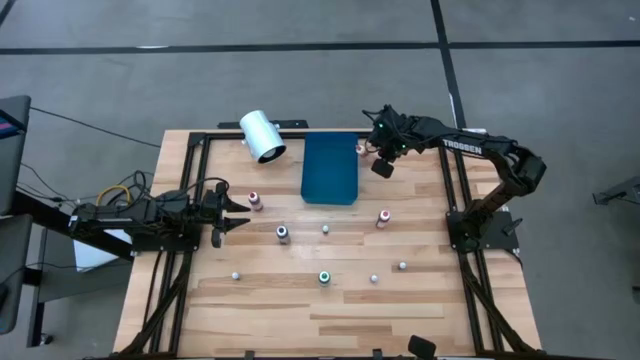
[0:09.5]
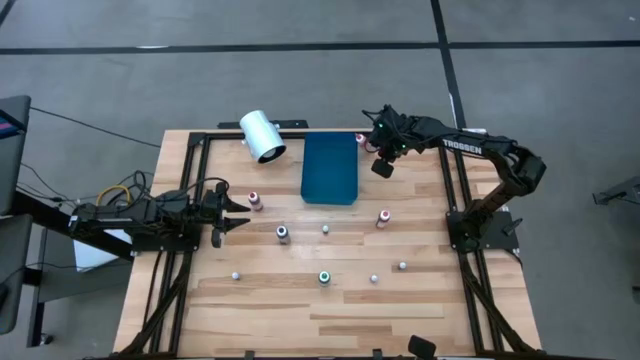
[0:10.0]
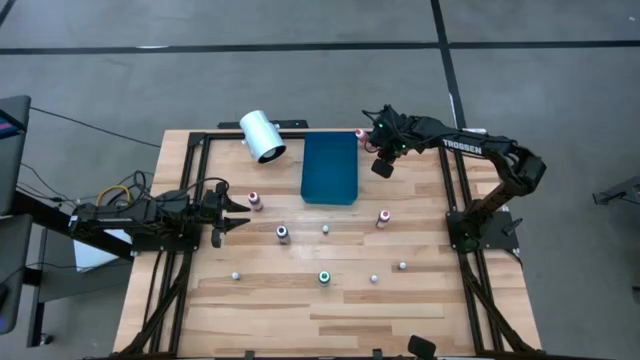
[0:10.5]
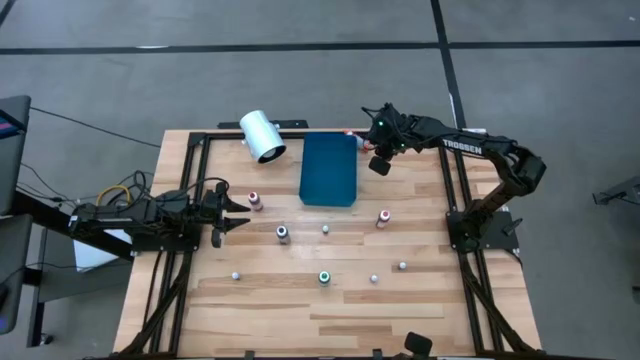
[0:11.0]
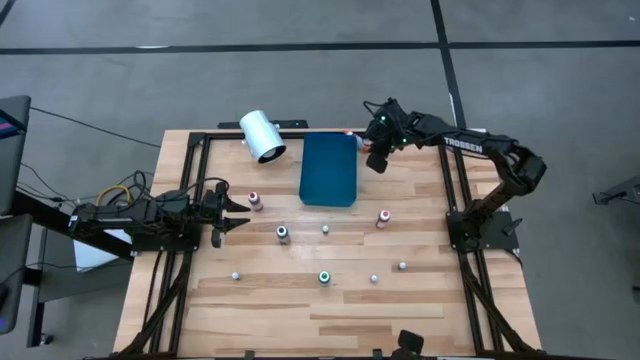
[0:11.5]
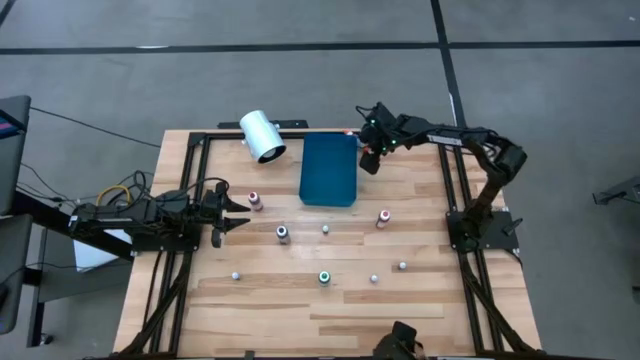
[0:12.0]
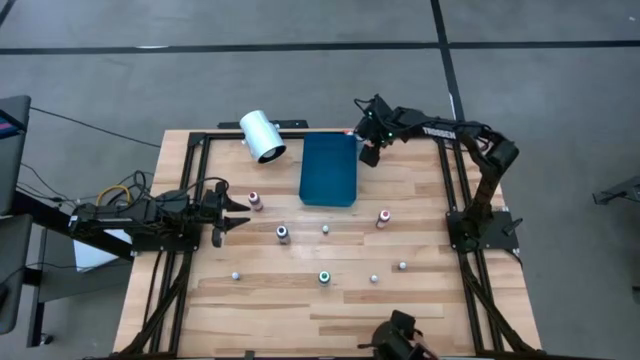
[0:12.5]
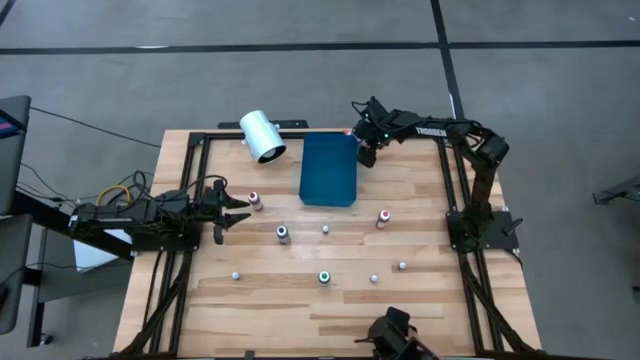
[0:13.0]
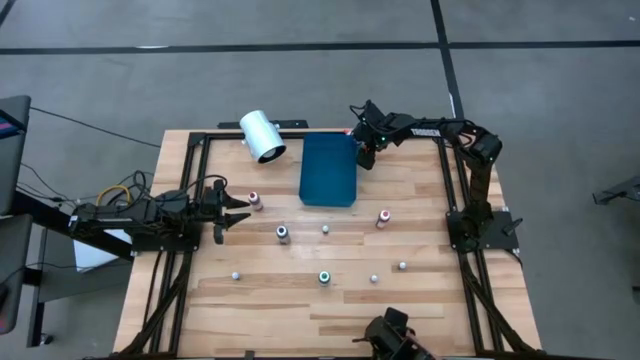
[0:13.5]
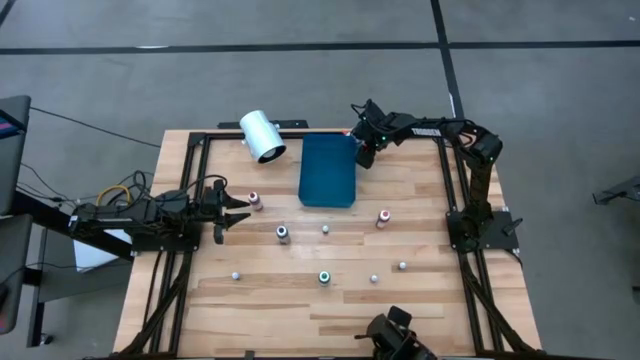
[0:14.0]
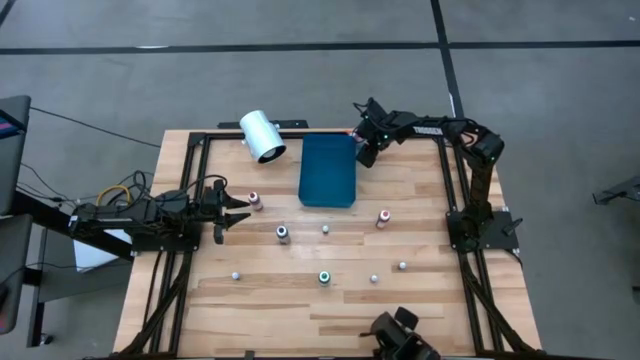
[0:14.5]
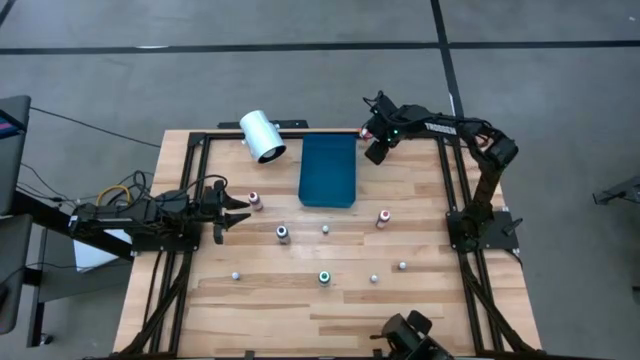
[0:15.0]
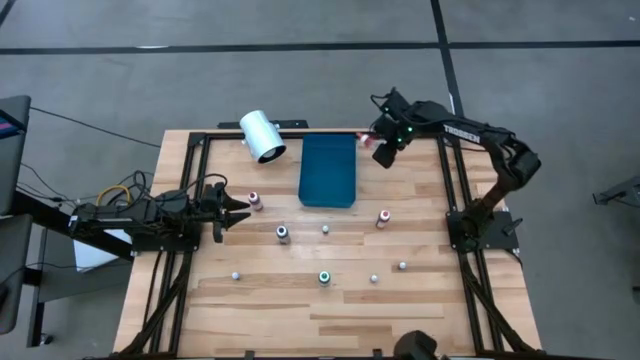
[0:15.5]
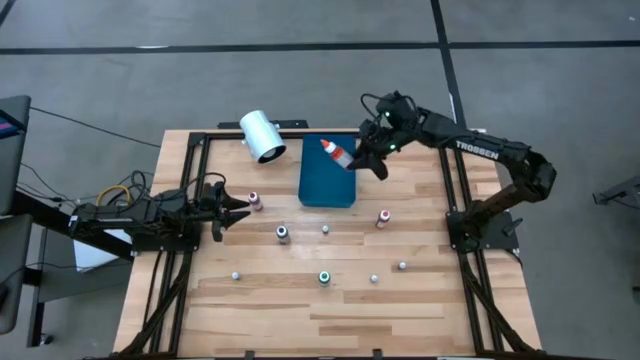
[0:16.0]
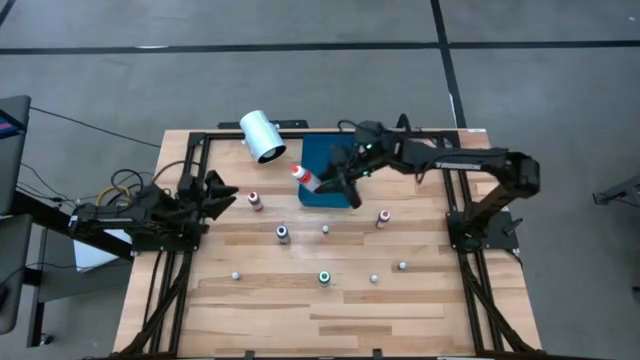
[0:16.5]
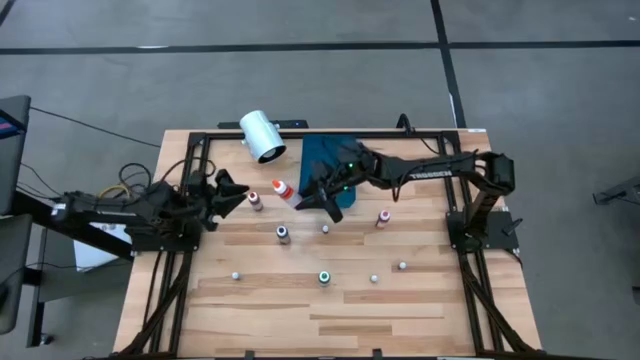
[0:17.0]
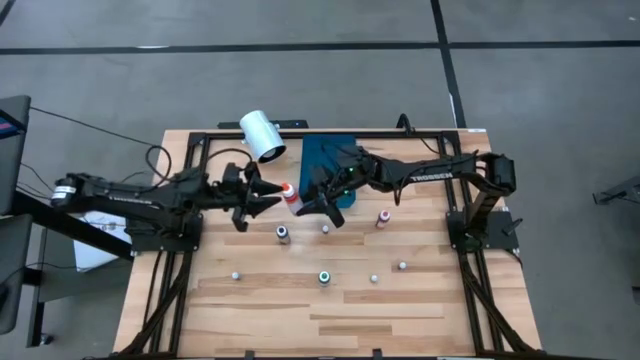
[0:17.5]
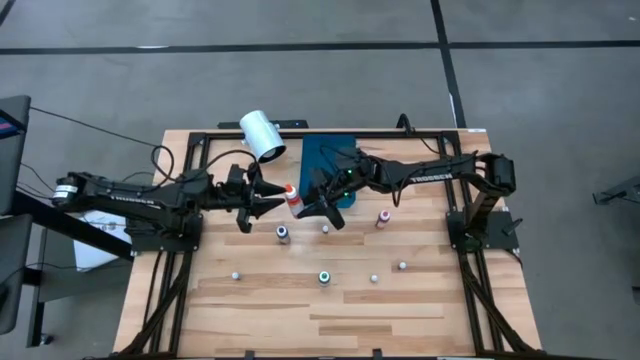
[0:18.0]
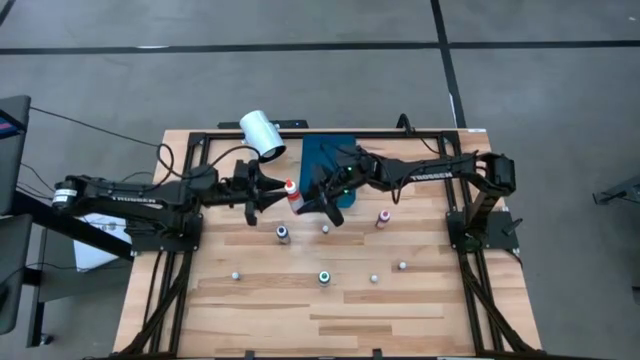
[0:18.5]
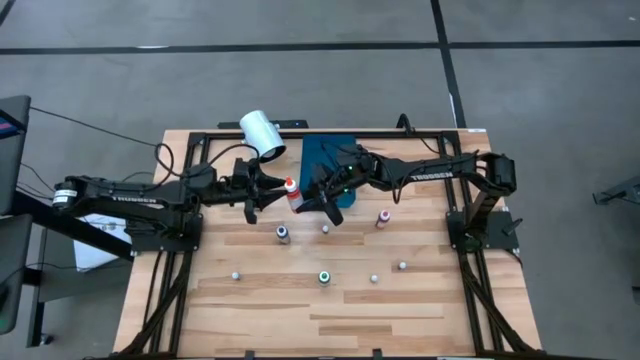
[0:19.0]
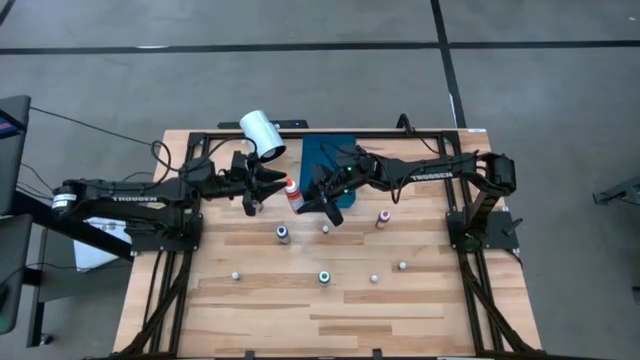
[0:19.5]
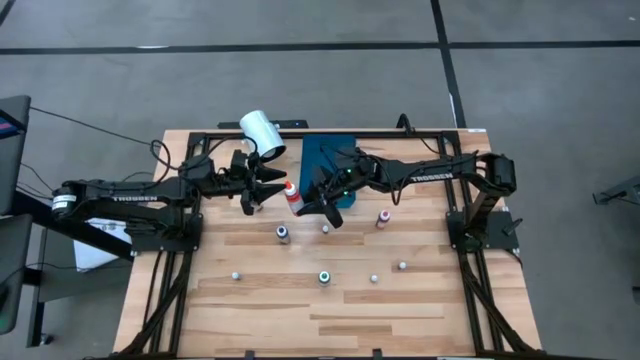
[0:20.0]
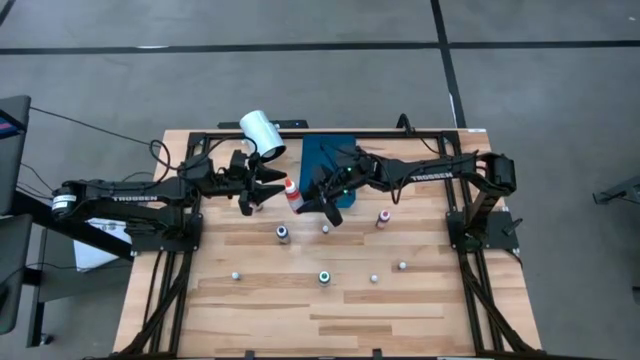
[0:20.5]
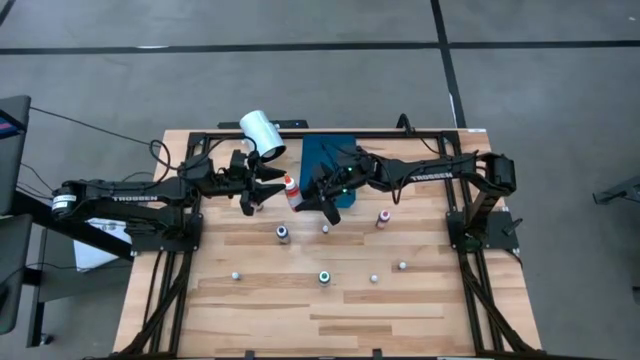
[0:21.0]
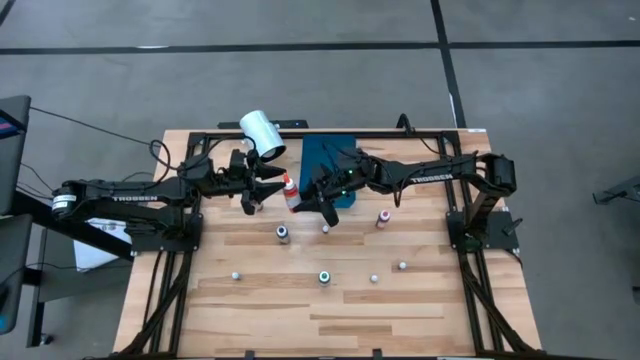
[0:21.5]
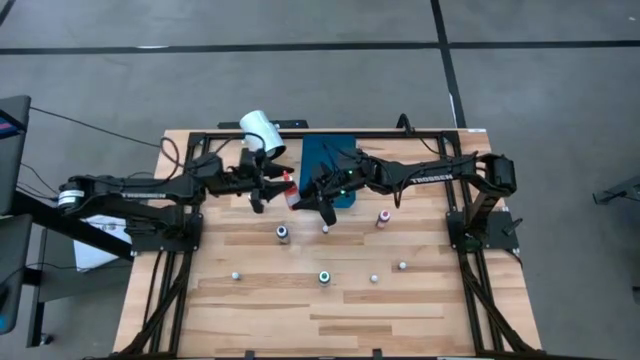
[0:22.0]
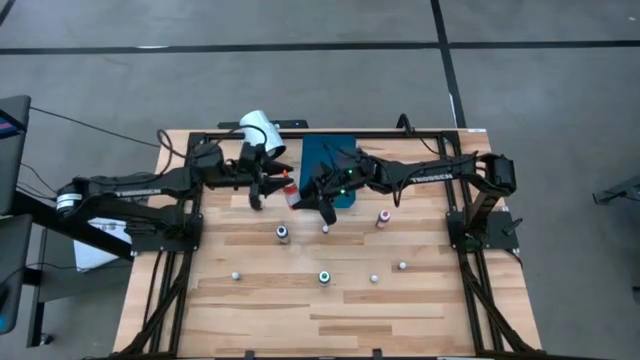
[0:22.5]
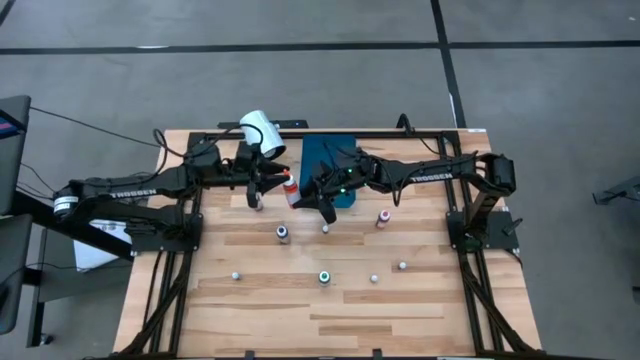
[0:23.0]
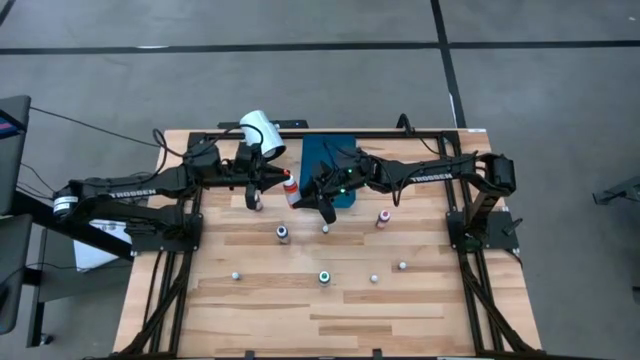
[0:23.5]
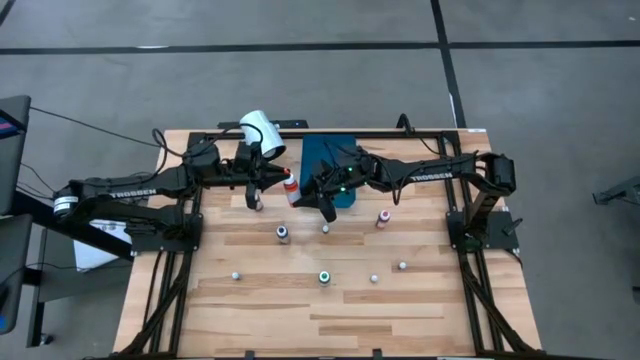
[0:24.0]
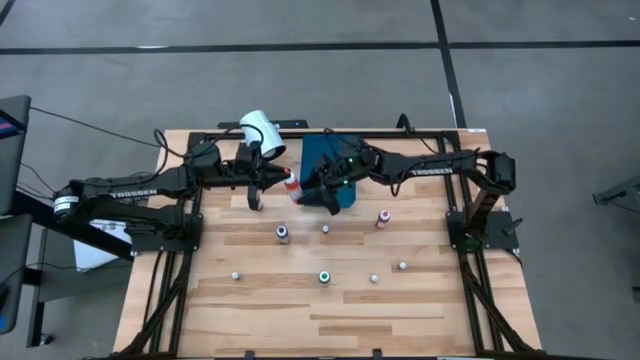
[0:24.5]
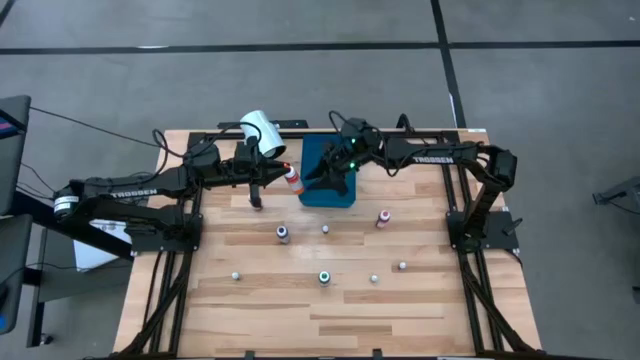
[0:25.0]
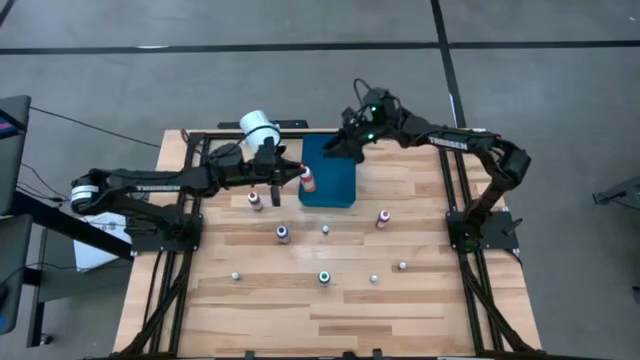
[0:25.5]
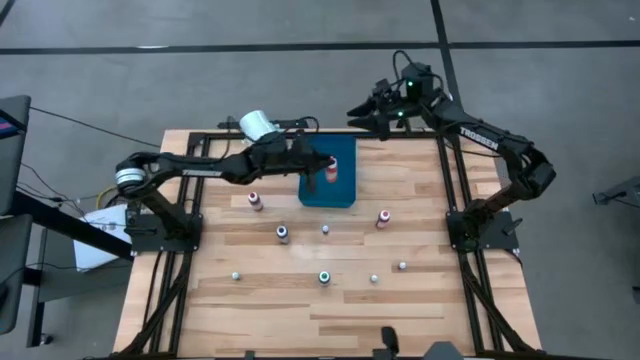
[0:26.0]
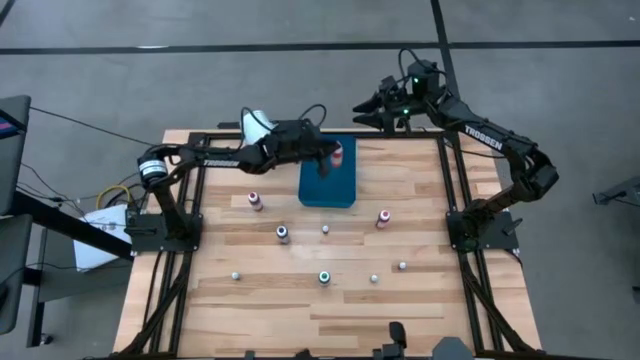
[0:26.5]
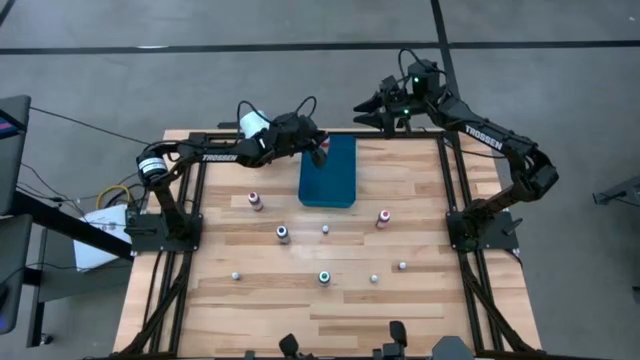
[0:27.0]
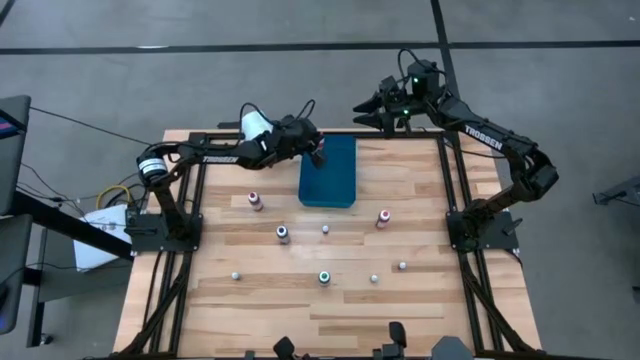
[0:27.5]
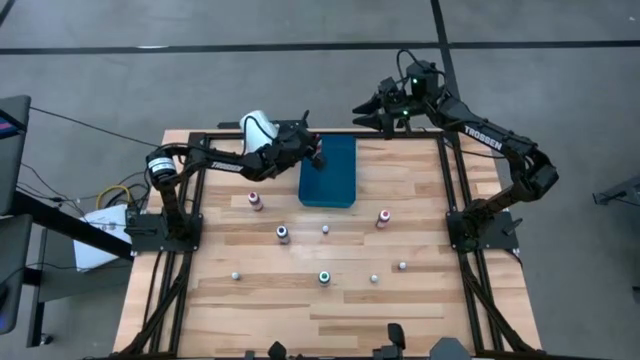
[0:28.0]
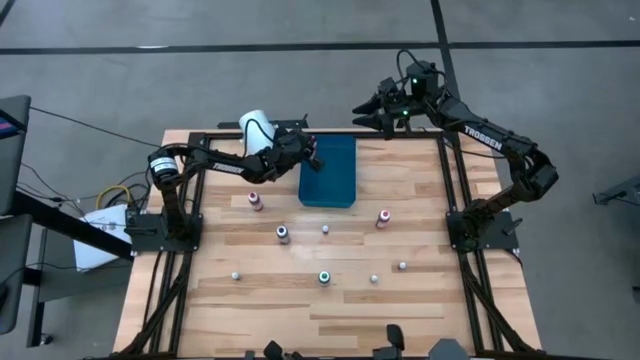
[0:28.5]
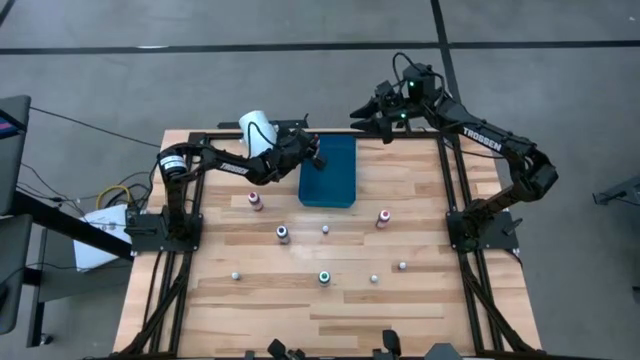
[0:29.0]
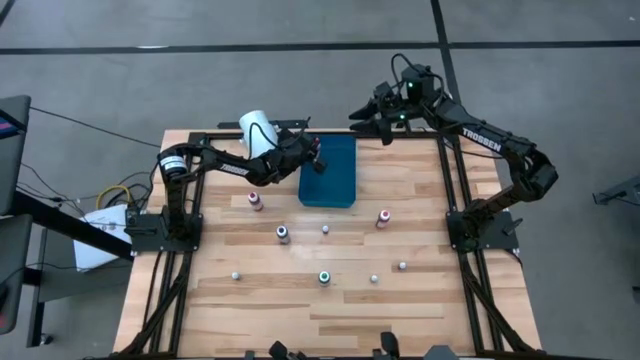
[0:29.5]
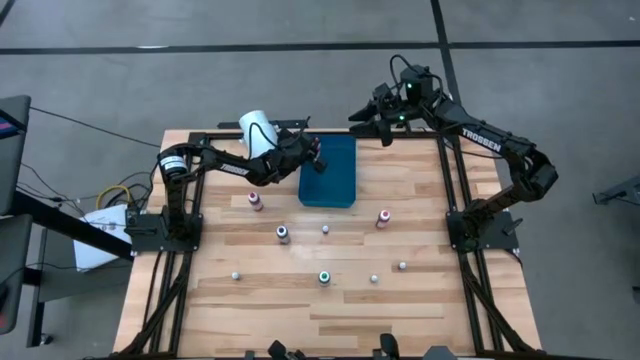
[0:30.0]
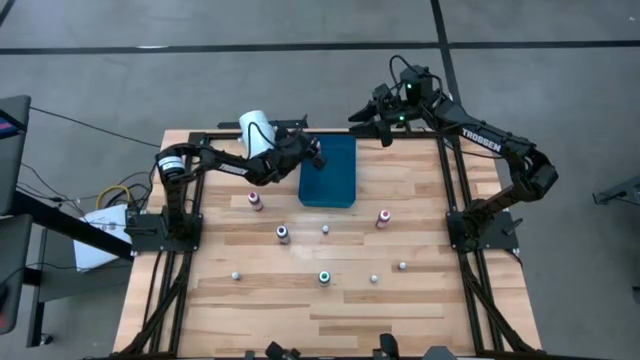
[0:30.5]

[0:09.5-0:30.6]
Task: Pick & Place food coloring
Put the big orange food coloring bottle into the blue bin
